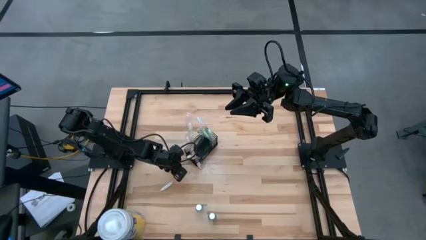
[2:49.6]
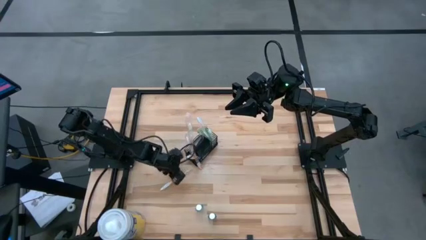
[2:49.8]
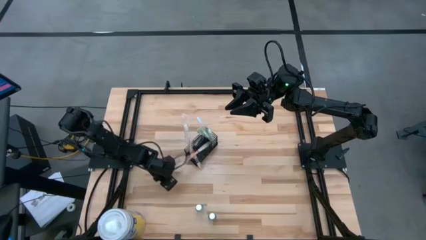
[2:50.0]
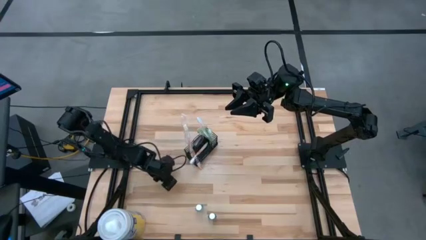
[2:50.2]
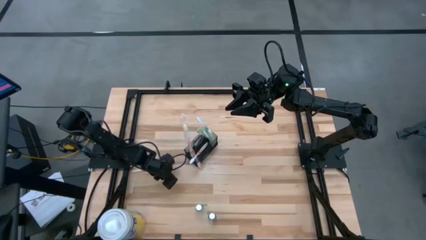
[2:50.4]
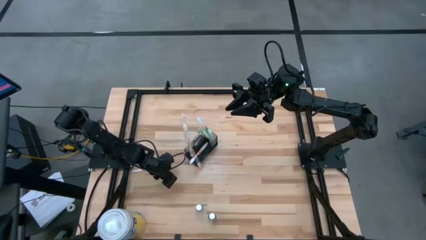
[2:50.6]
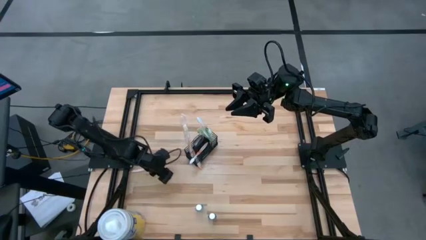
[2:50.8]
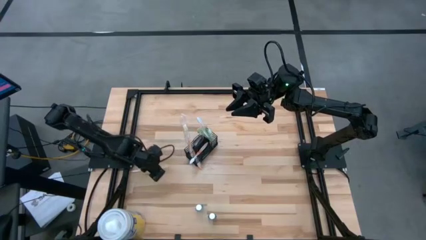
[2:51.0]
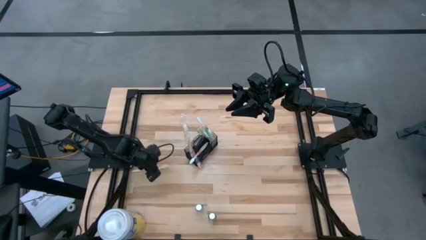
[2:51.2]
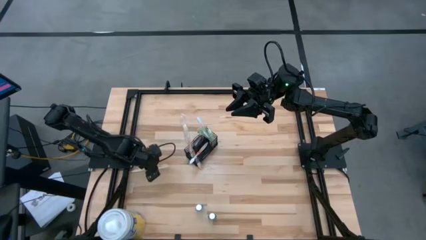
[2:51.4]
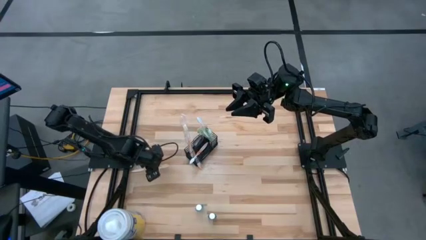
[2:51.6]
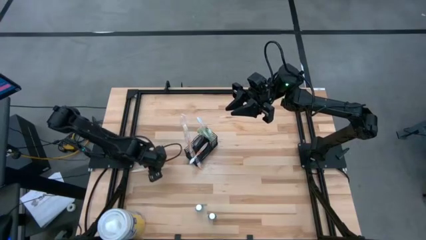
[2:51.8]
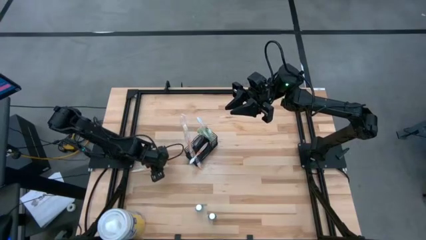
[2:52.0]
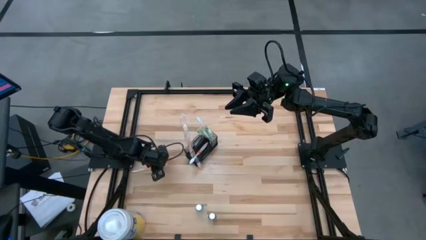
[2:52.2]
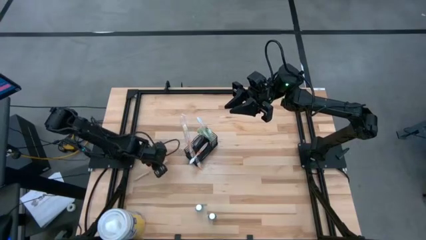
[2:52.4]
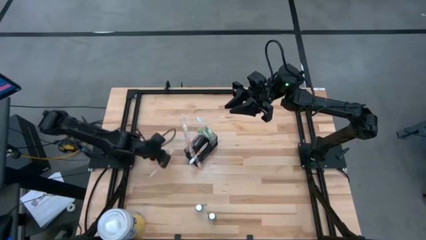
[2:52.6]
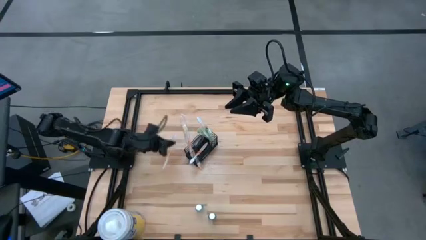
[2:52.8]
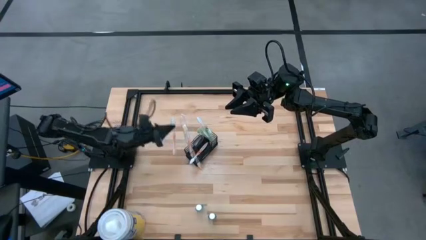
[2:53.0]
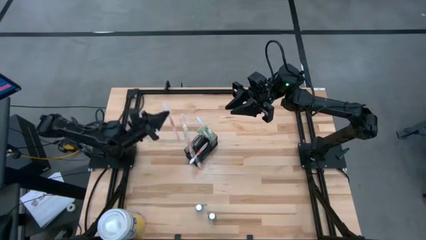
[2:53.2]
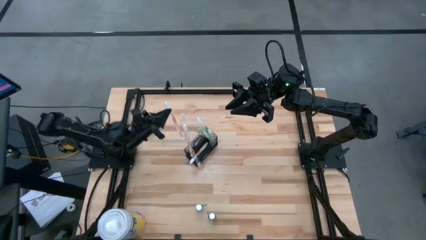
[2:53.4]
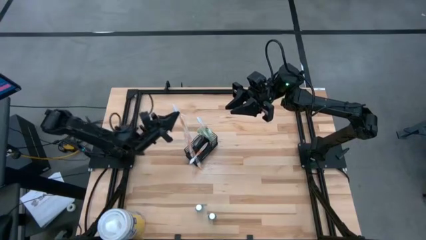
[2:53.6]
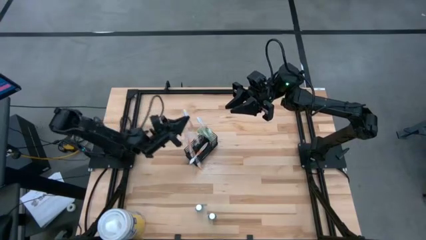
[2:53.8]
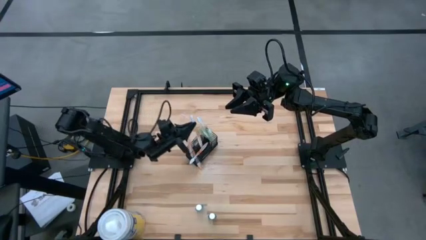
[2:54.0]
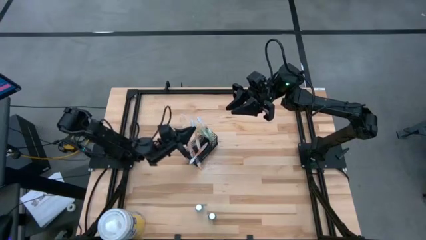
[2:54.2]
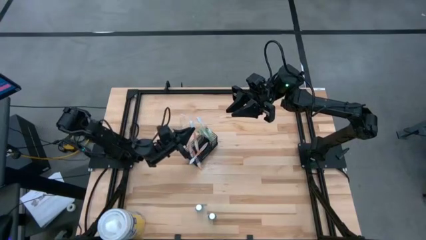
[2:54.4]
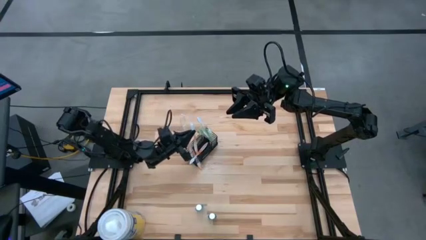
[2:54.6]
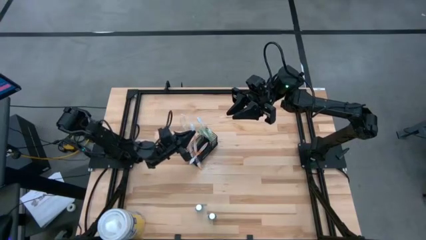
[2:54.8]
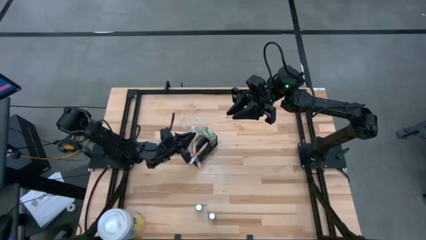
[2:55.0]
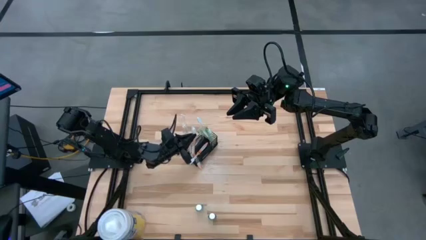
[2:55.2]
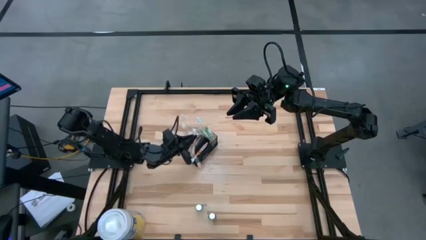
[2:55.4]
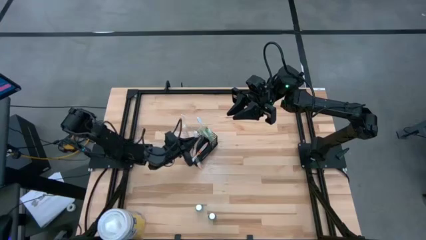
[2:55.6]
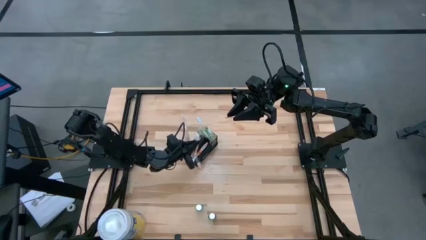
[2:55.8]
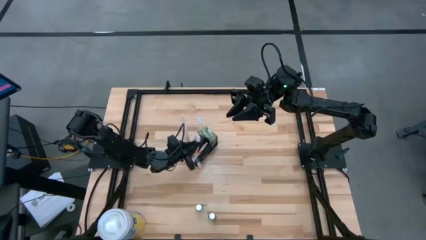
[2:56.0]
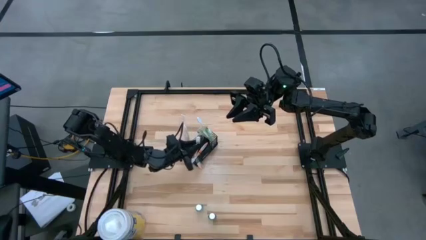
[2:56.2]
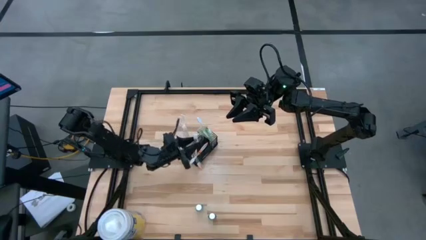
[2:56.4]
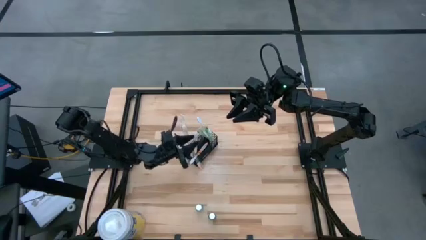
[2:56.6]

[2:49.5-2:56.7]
Task: Pick & Place toothbrushing station
Put the orange toothbrush into the wire organizer

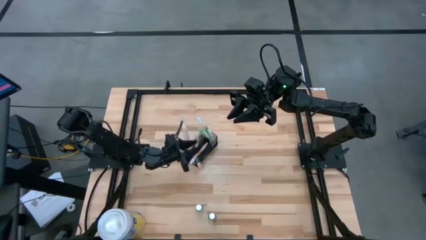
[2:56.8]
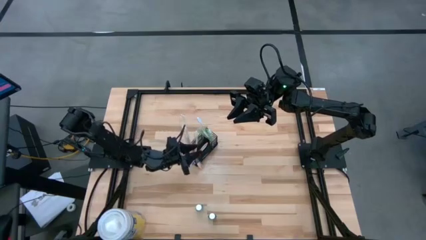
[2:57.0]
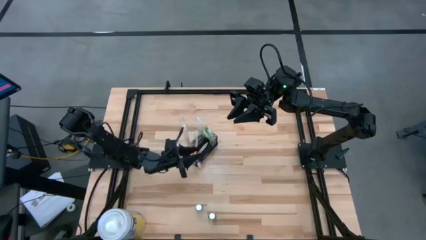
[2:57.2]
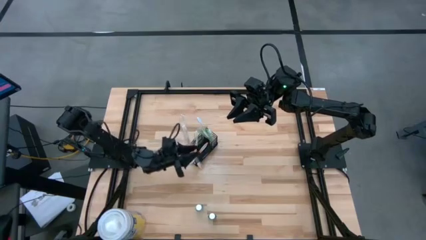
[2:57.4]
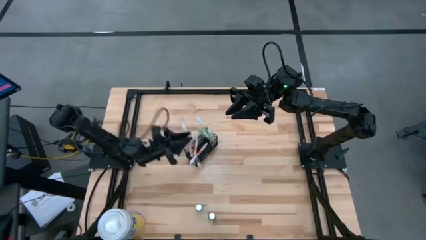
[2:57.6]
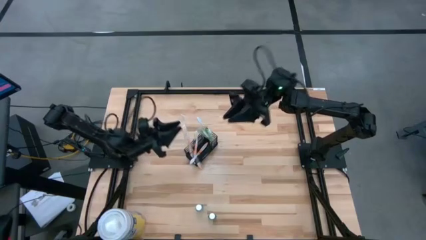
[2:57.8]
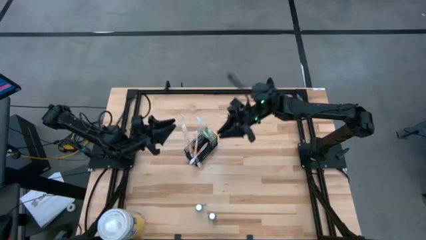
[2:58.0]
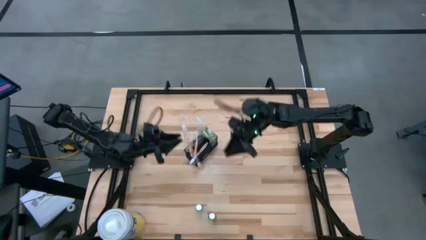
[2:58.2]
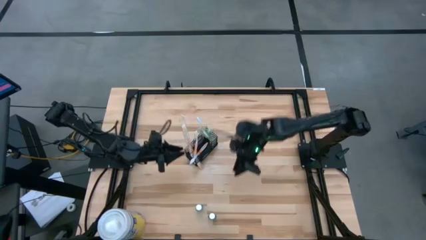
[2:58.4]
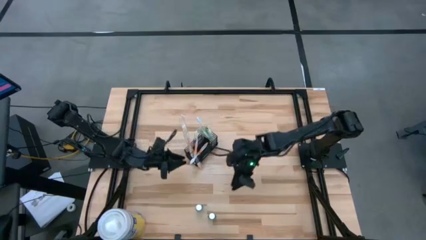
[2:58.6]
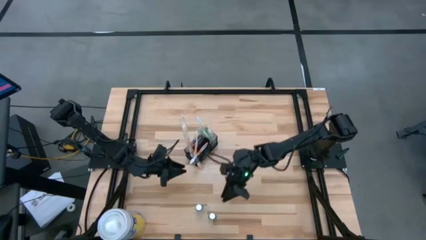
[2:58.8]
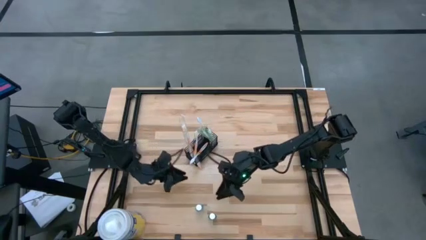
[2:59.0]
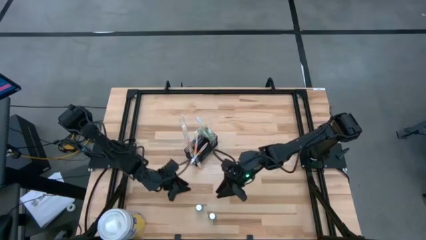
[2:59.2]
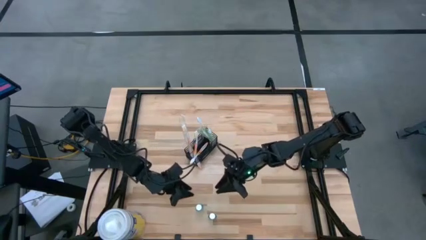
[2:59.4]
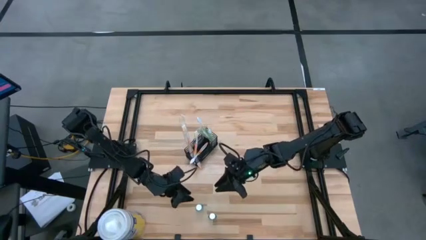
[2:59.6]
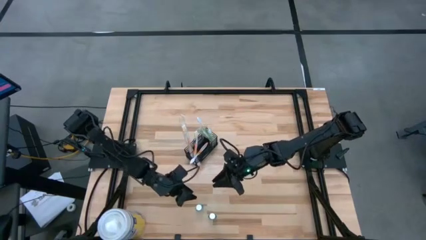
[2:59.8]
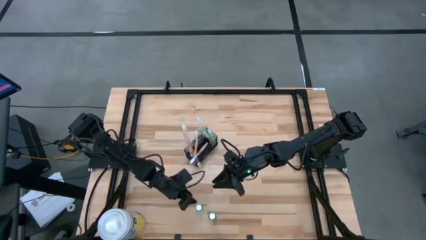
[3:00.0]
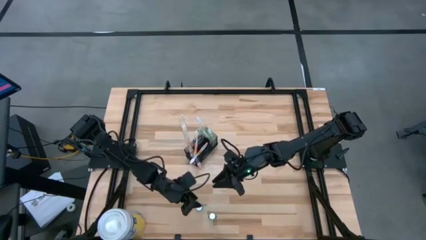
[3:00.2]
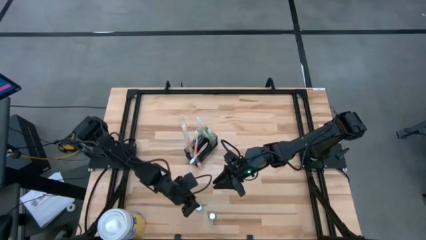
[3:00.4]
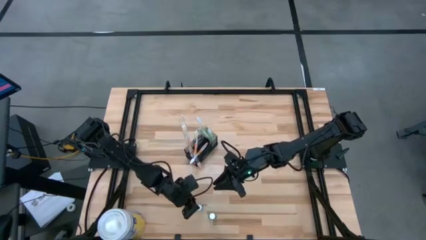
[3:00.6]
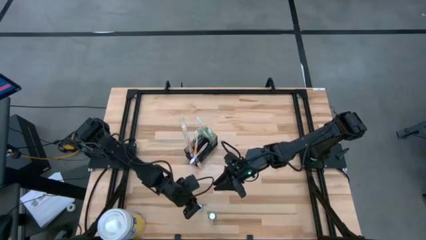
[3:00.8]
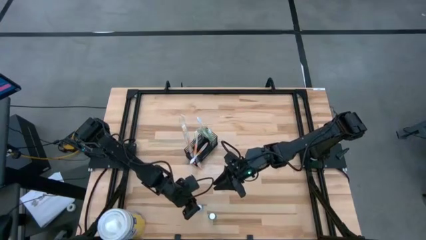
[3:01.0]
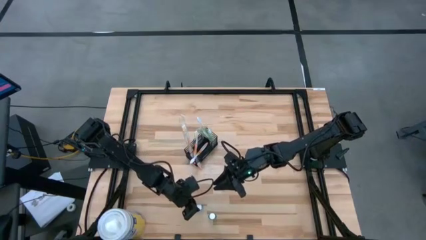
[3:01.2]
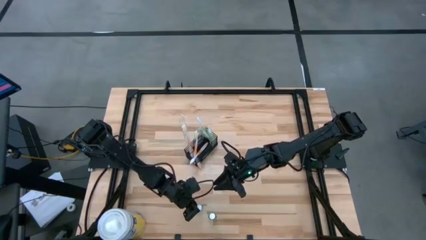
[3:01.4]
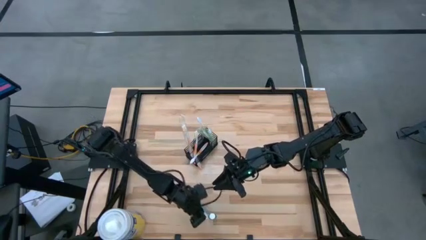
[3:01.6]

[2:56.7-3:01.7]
Put the left blue mouthwash into the wire organizer
